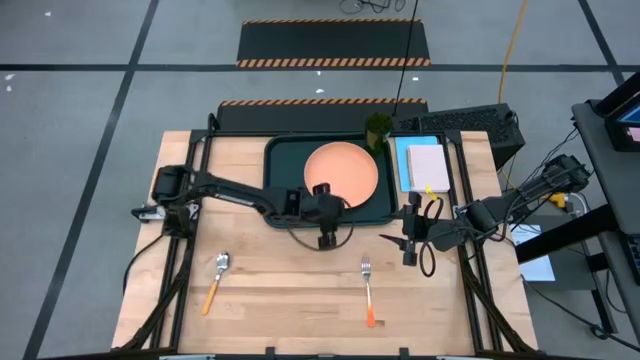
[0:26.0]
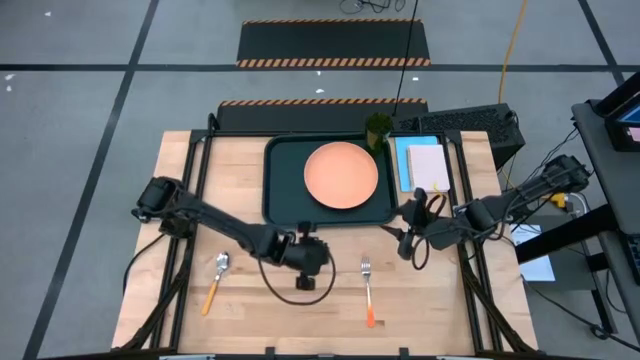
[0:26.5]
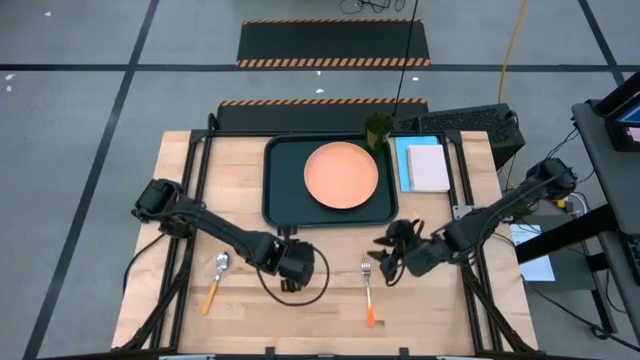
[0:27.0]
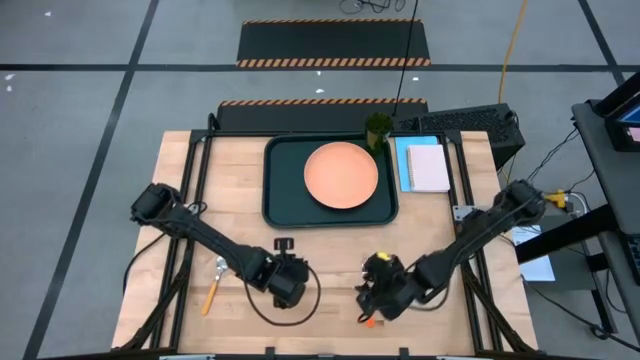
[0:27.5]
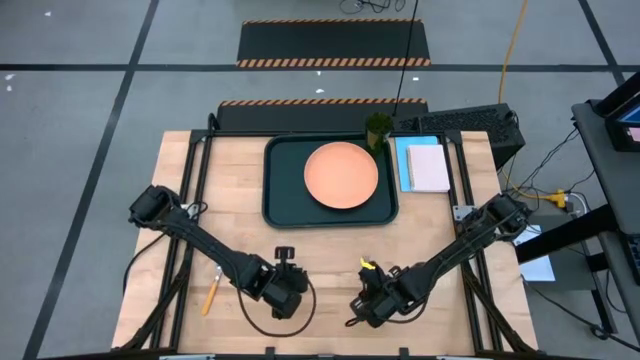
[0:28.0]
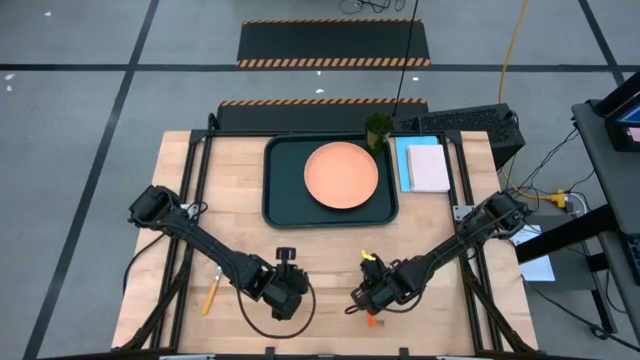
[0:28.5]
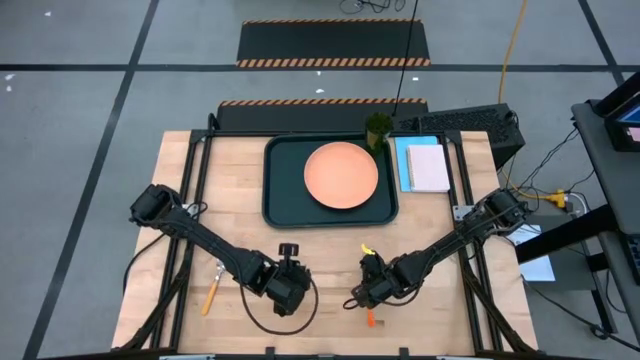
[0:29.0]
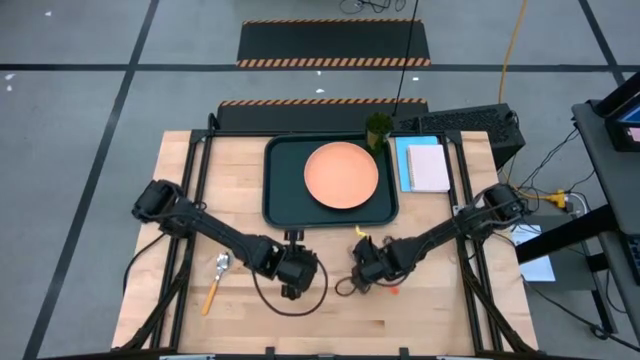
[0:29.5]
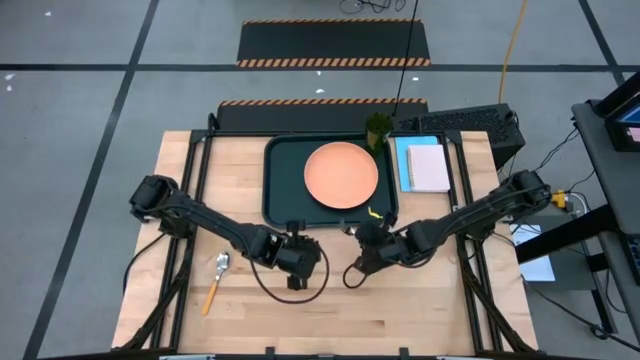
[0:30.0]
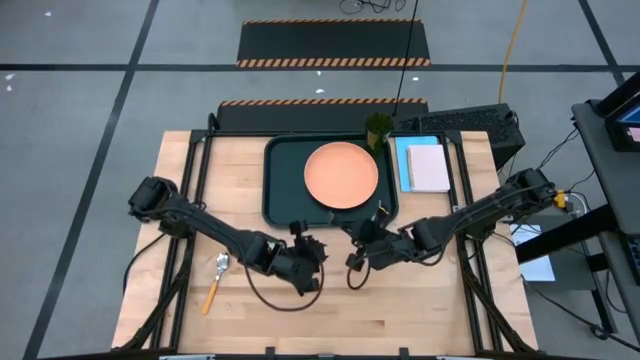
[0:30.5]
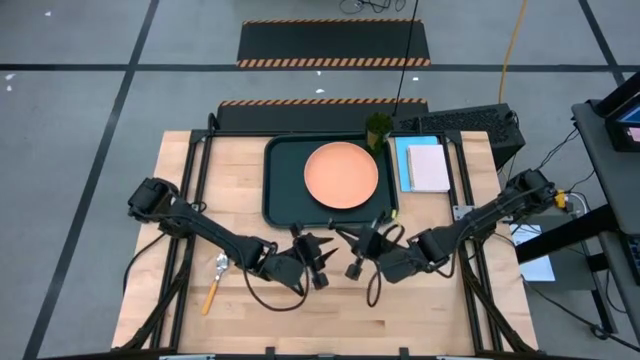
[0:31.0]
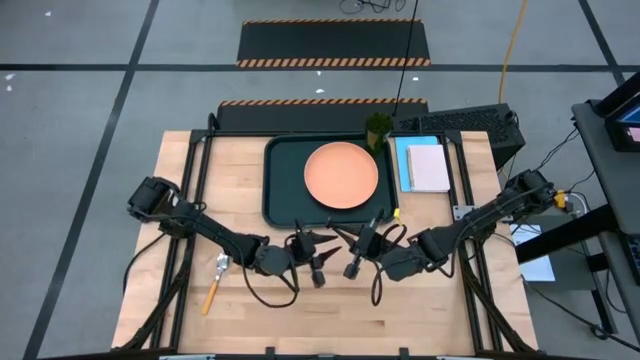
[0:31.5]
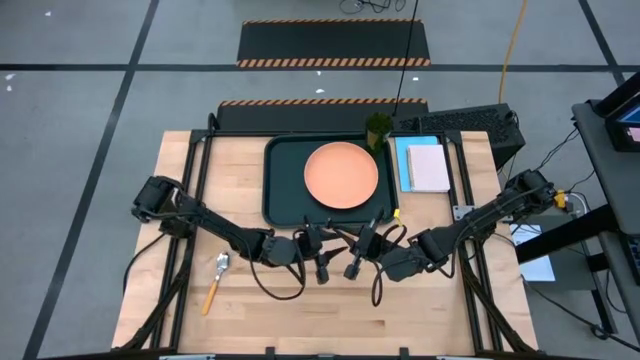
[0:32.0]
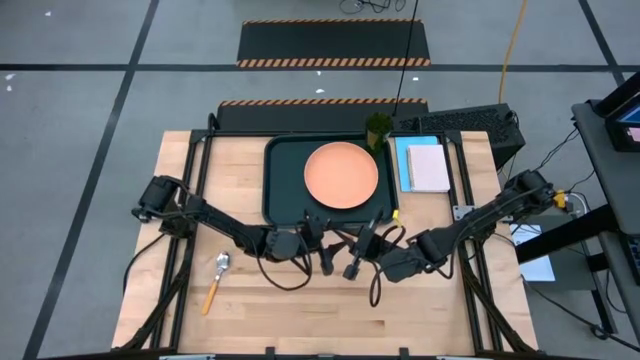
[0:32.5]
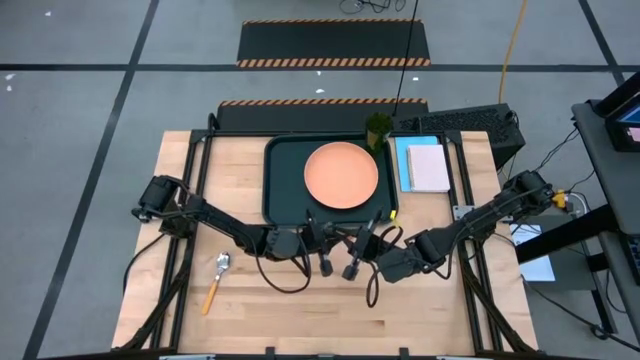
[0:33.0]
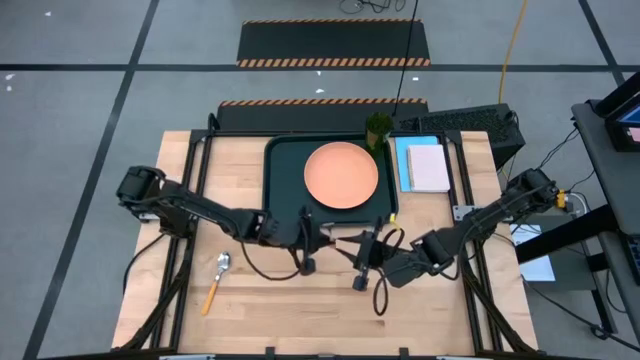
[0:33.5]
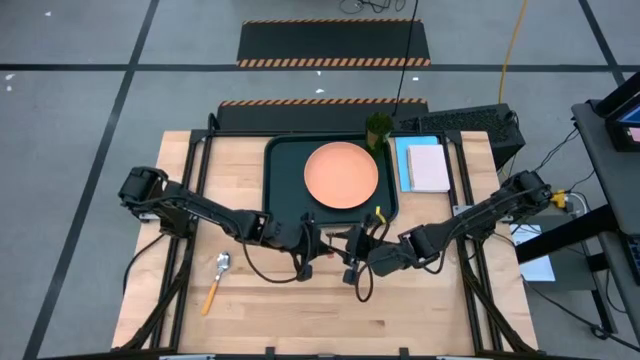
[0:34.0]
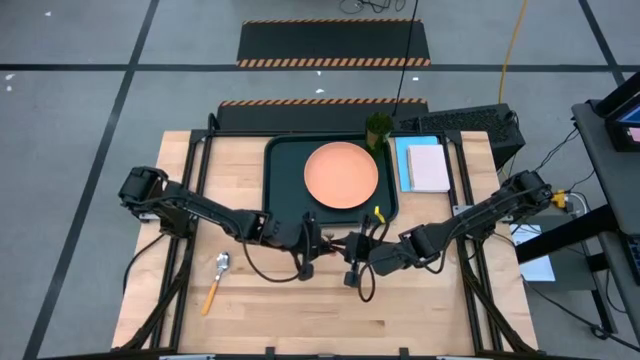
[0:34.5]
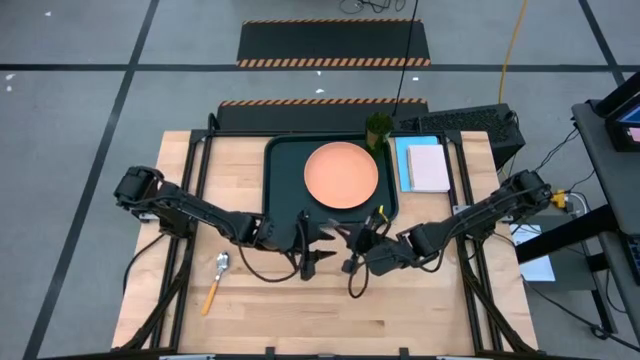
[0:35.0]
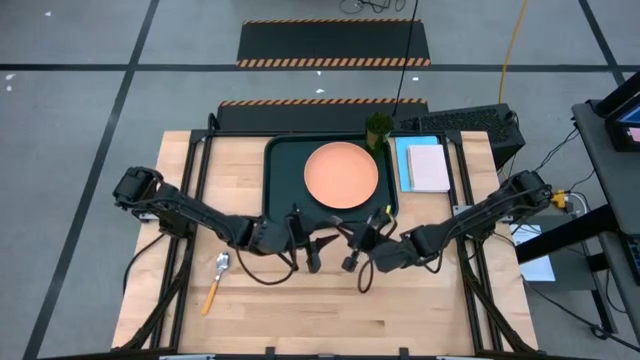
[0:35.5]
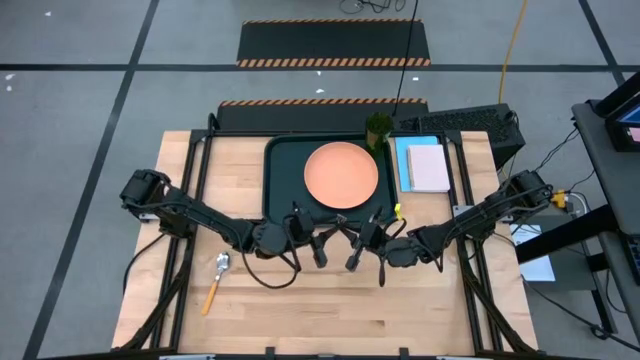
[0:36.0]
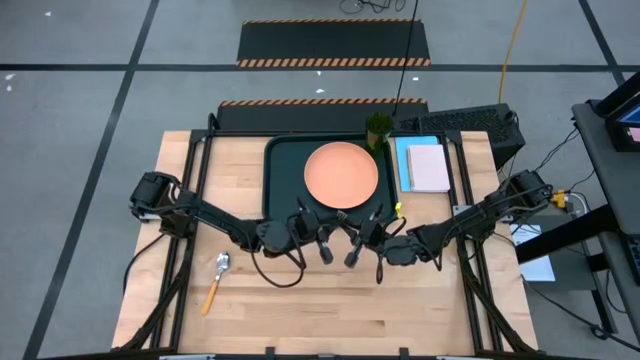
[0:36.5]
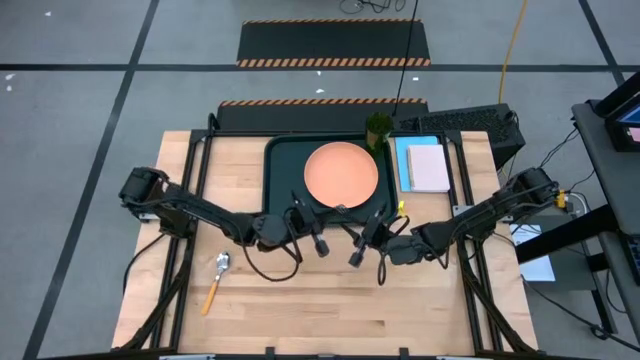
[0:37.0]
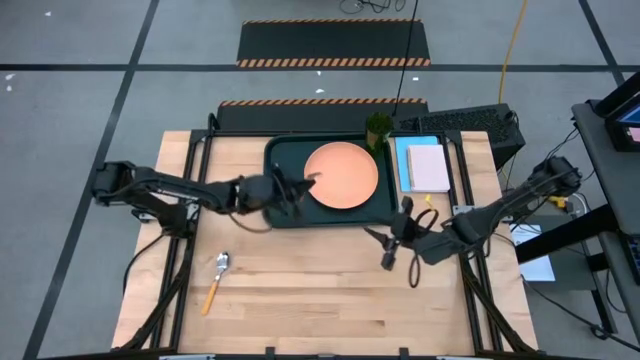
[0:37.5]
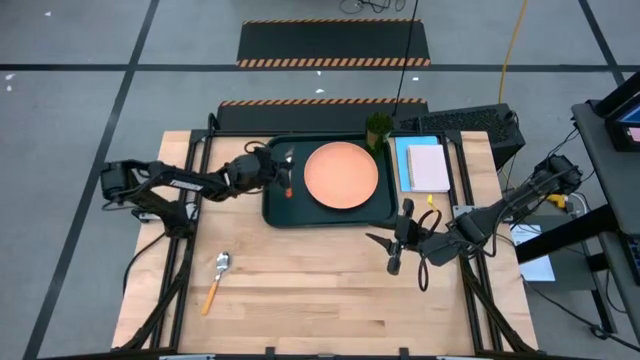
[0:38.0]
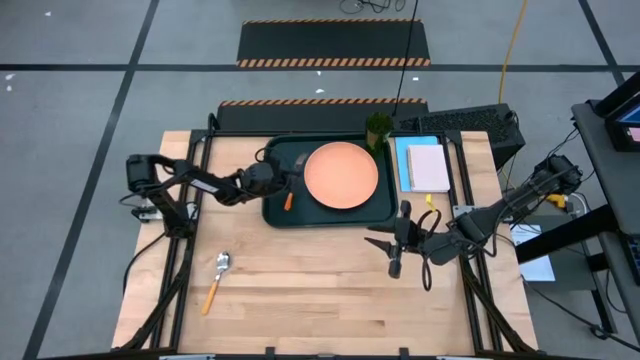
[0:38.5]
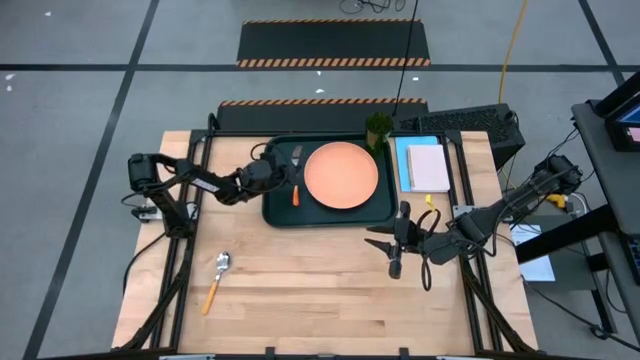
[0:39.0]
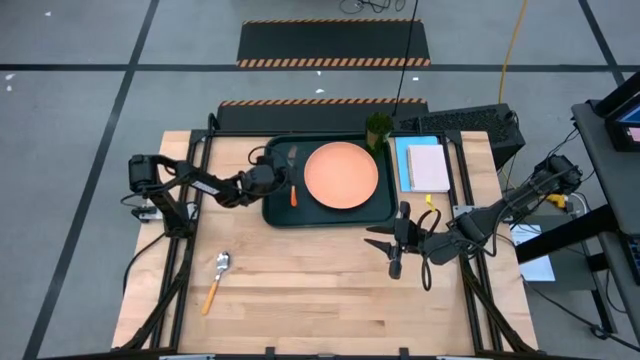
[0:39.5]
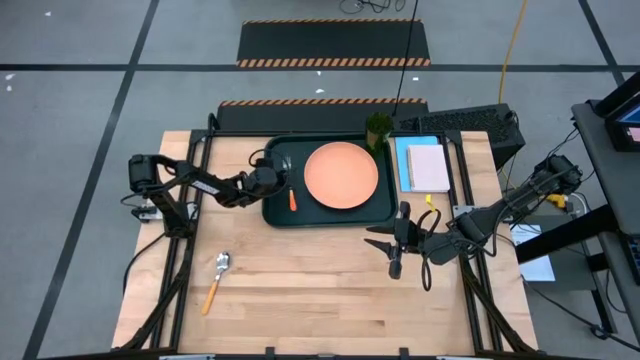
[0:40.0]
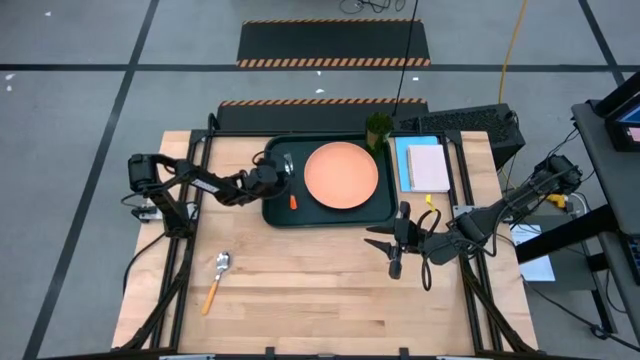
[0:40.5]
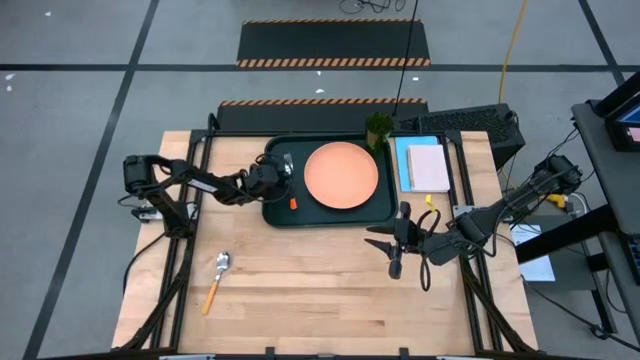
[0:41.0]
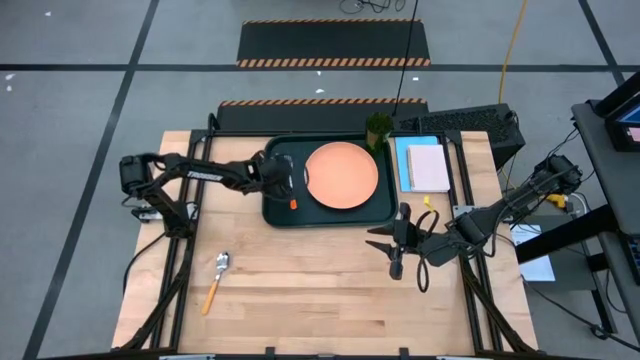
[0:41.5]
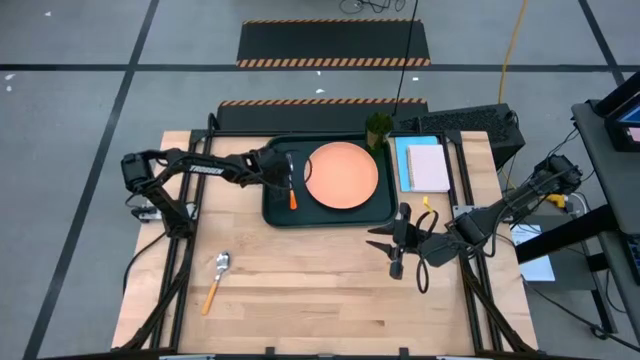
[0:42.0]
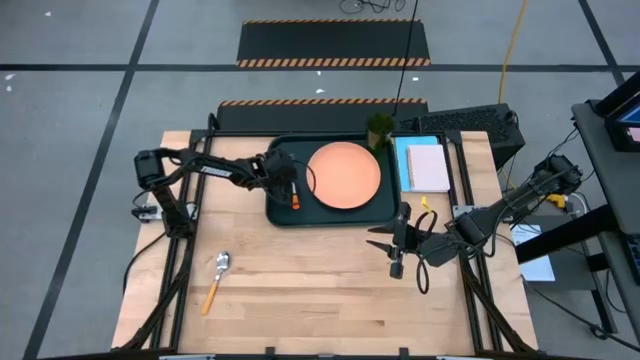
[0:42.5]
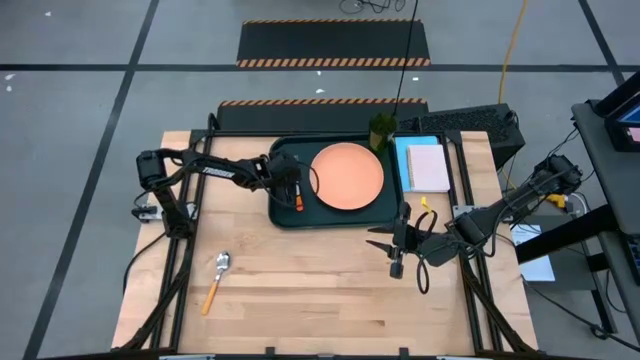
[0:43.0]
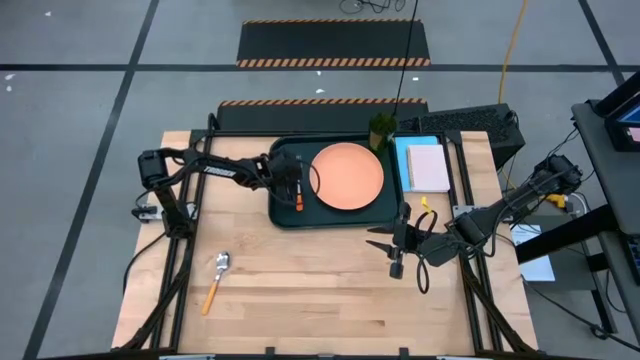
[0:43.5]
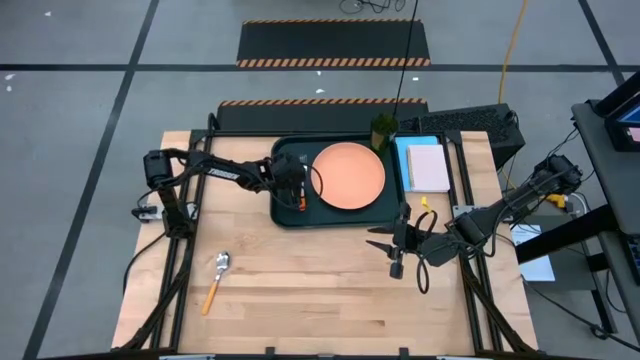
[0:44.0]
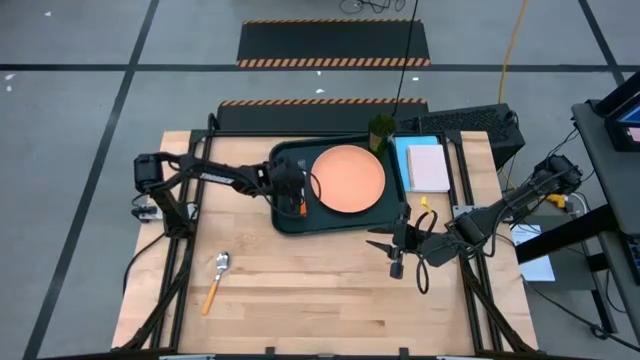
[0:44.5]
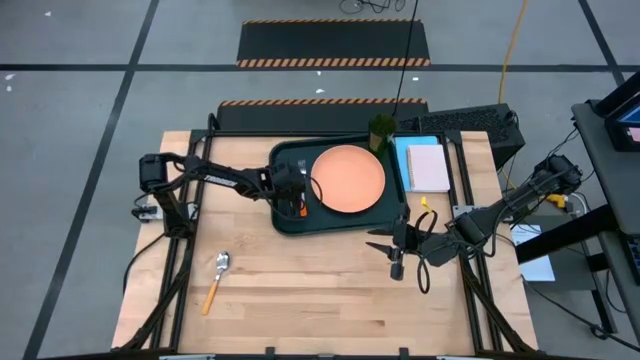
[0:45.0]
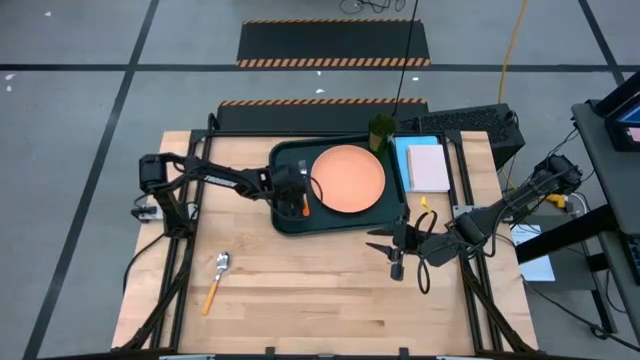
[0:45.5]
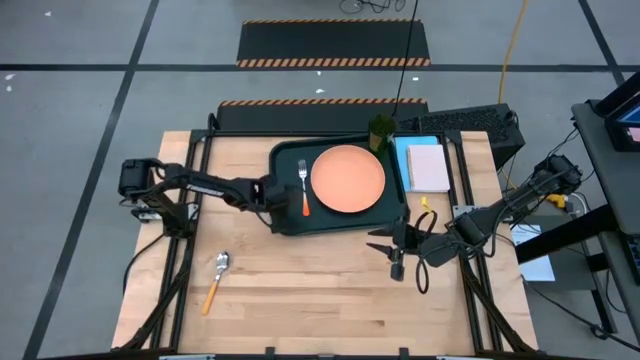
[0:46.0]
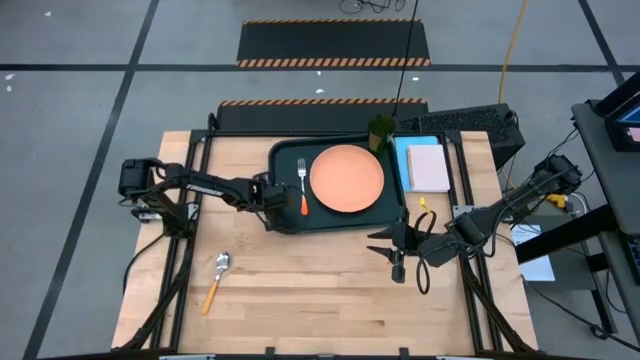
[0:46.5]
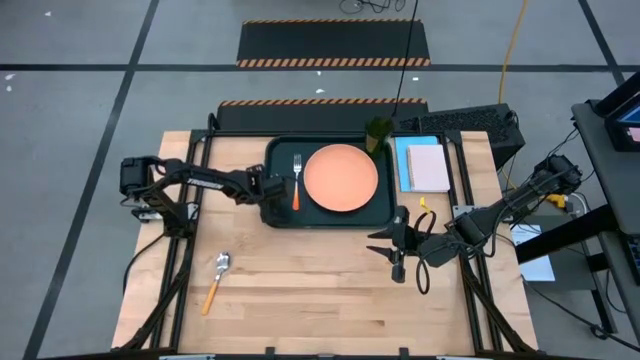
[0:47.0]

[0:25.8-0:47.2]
Task: Pick and place plate/cup/fork/spoon on tray
Put the orange fork on the black tray to the left of the orange plate
